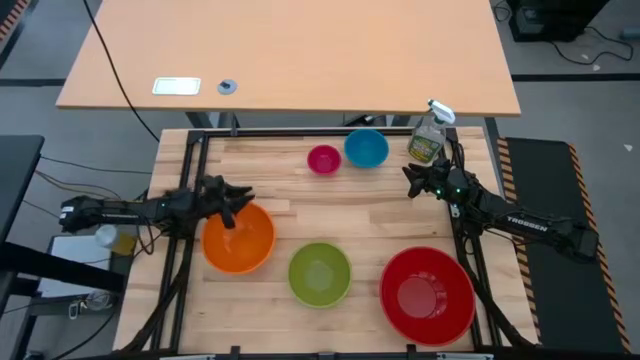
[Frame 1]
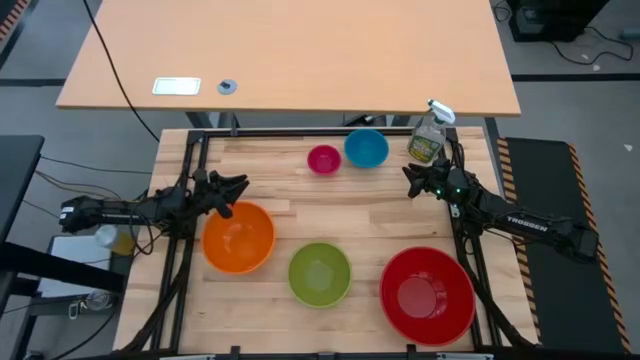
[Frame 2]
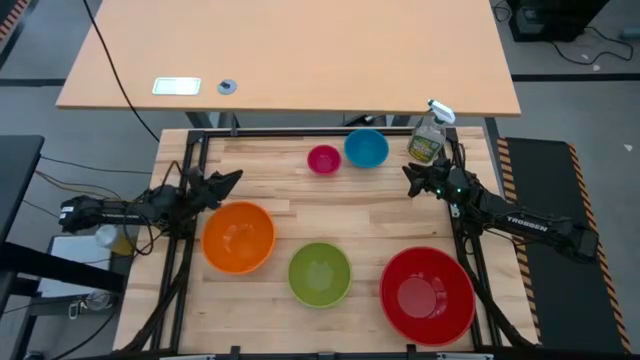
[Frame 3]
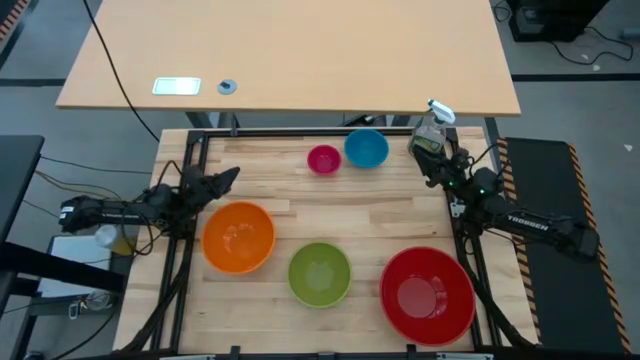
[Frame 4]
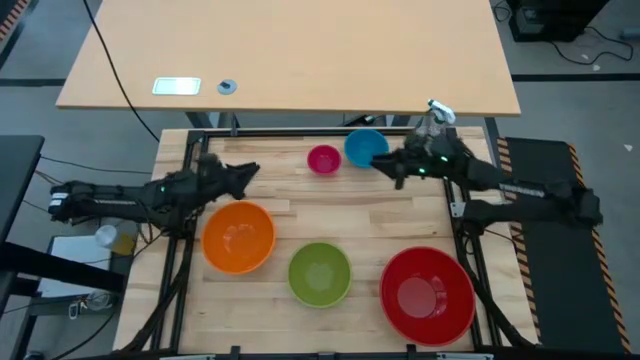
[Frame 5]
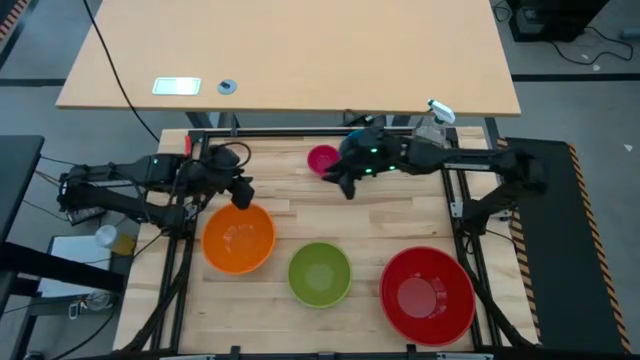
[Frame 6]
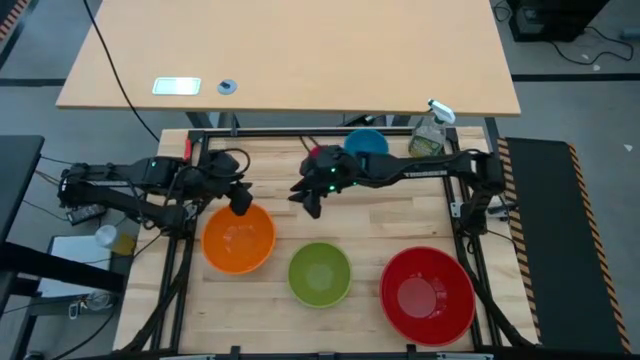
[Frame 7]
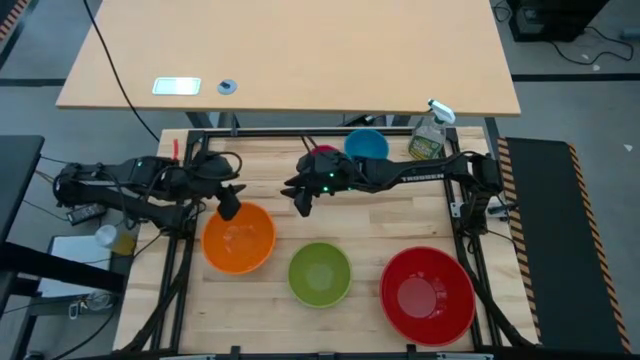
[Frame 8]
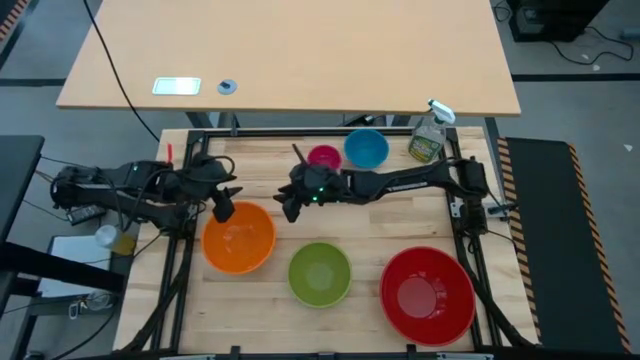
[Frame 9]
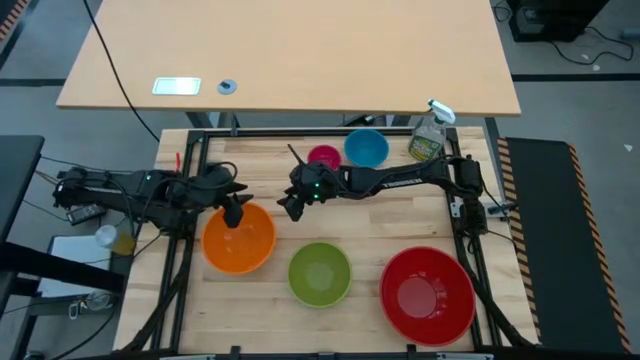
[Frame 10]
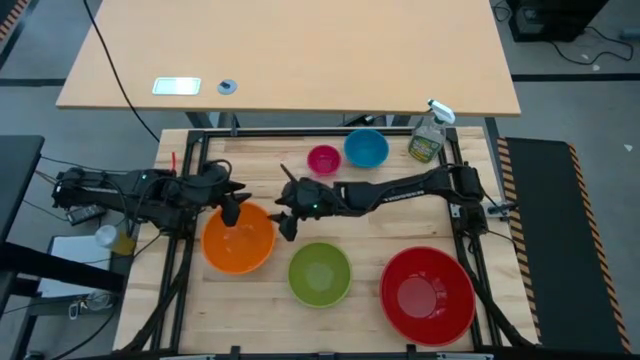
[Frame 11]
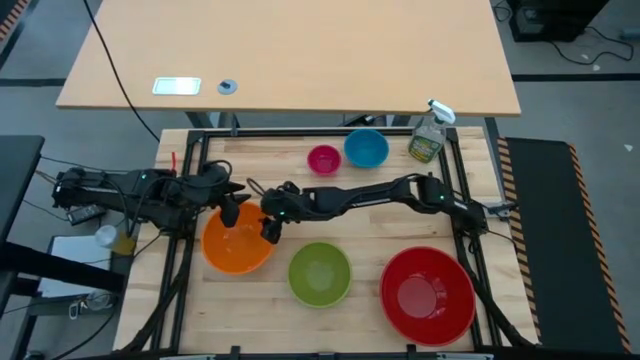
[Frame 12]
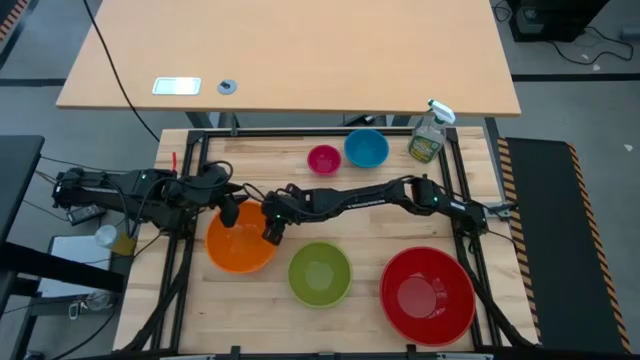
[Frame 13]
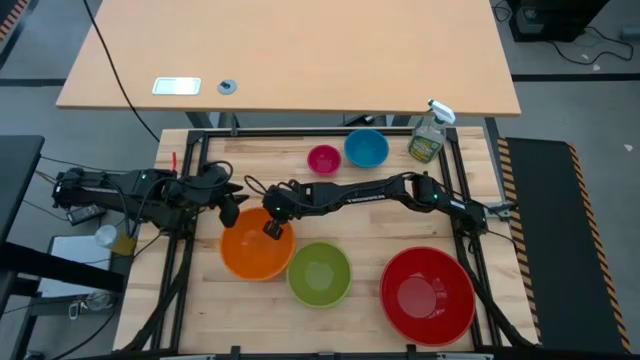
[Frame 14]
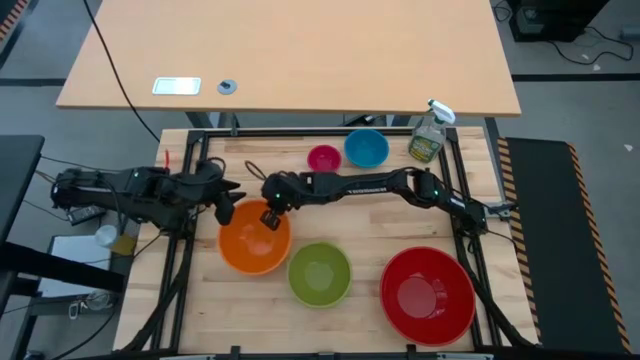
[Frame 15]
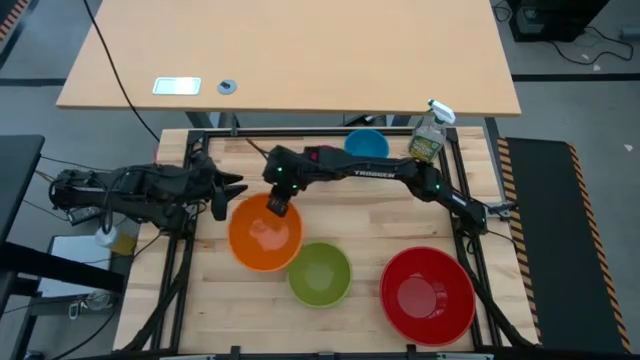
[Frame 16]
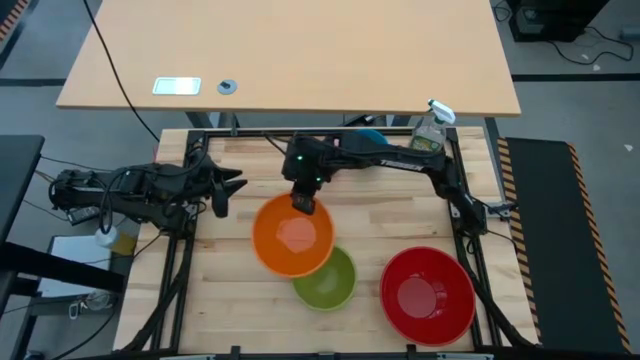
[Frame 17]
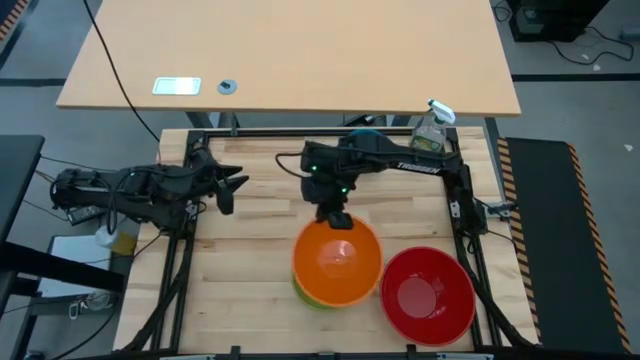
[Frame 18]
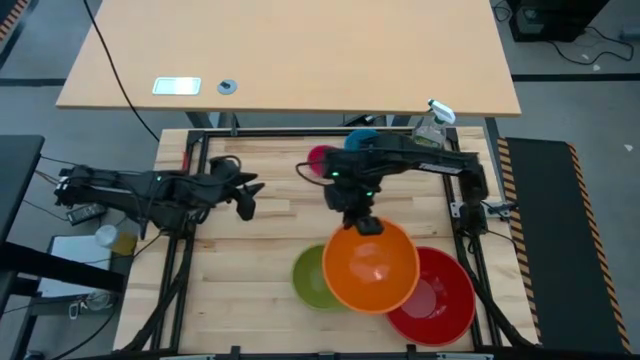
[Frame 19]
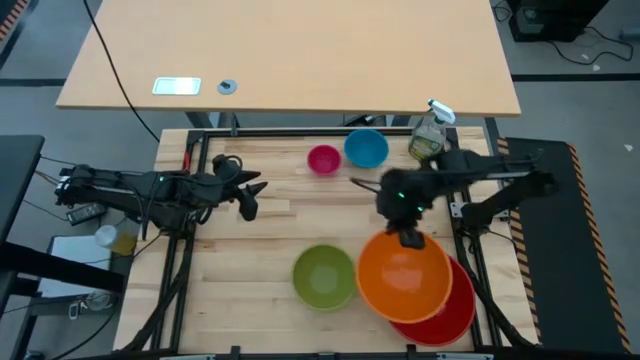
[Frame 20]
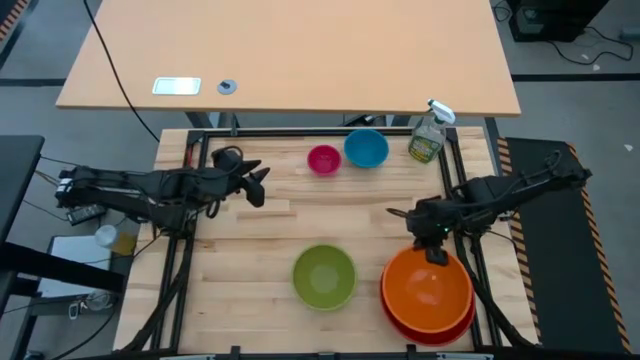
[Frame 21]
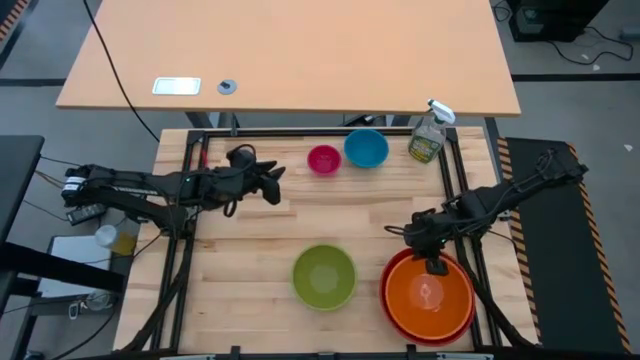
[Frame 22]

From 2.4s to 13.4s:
Stack the orange bowl into the red bowl

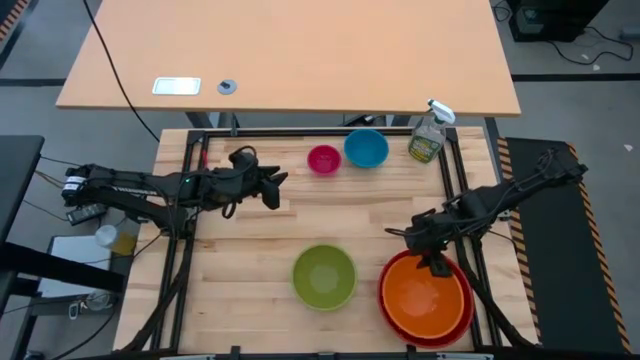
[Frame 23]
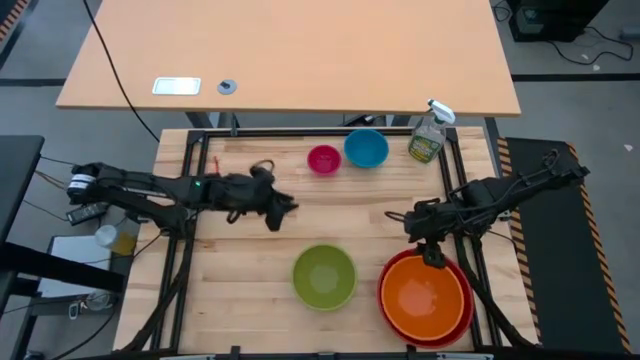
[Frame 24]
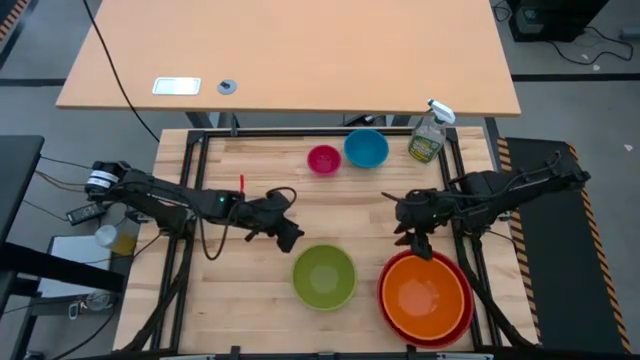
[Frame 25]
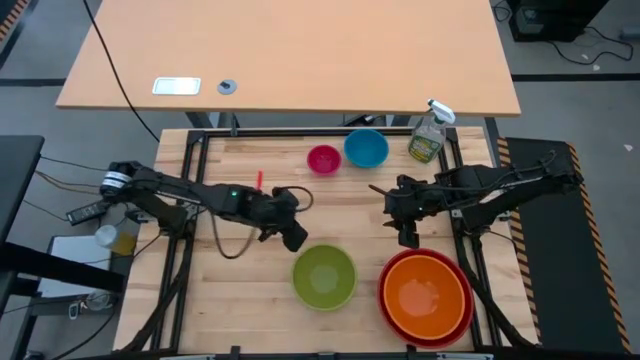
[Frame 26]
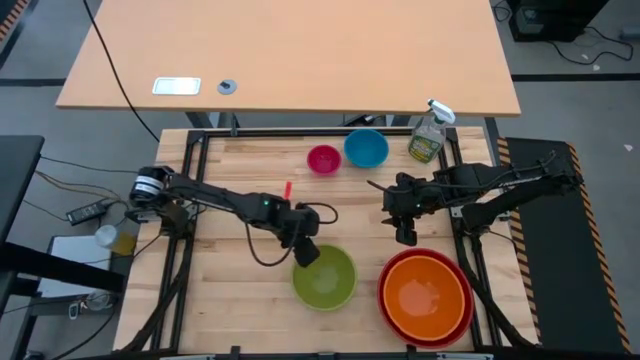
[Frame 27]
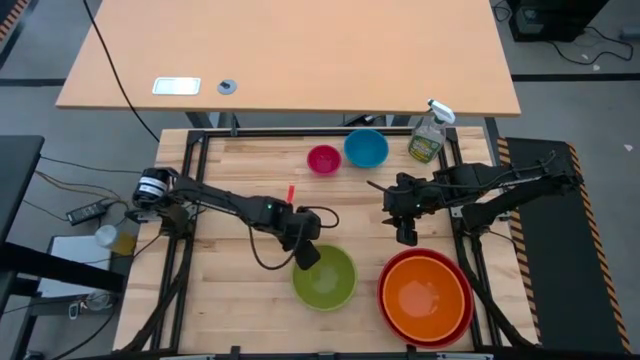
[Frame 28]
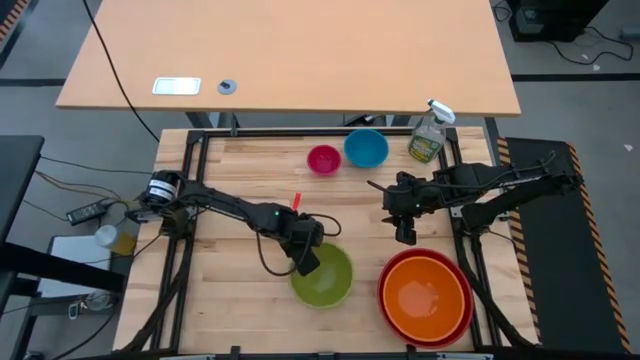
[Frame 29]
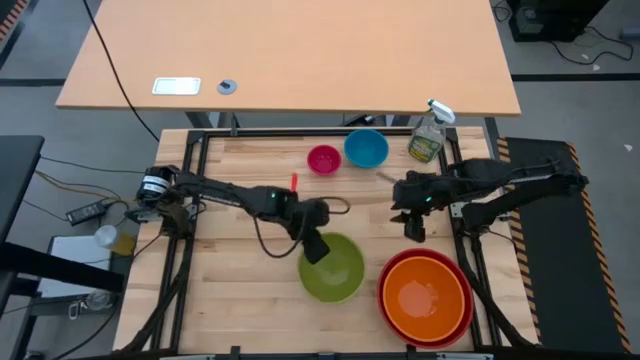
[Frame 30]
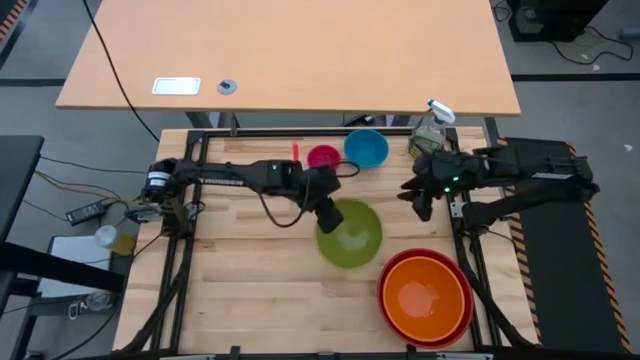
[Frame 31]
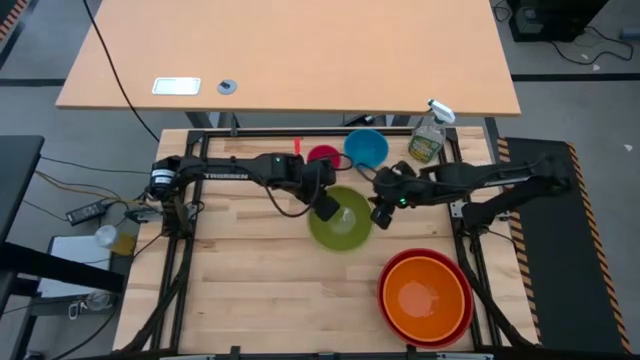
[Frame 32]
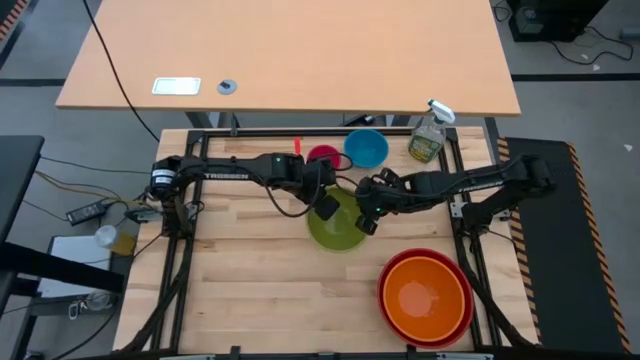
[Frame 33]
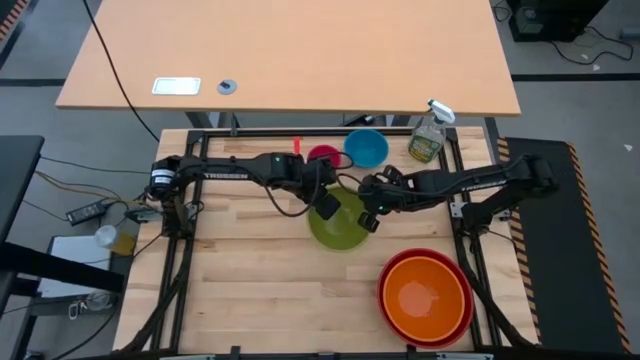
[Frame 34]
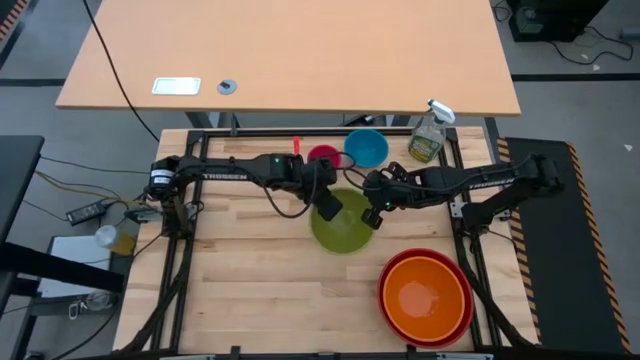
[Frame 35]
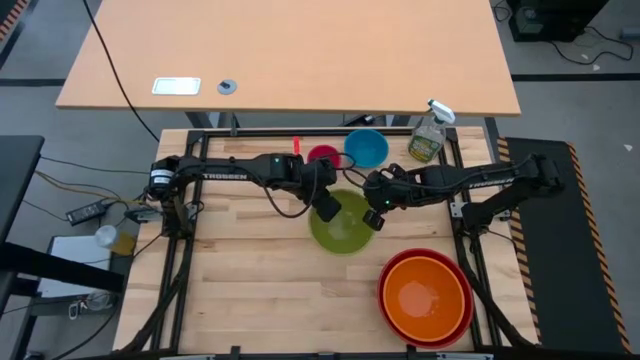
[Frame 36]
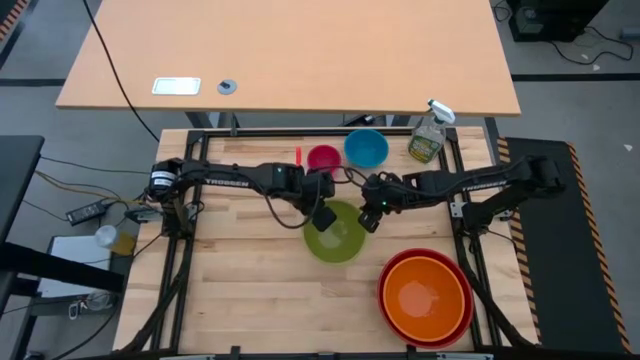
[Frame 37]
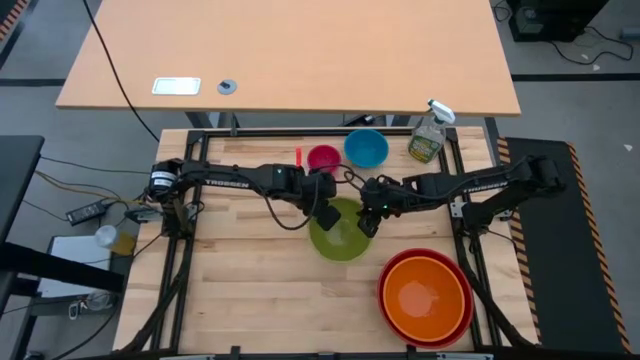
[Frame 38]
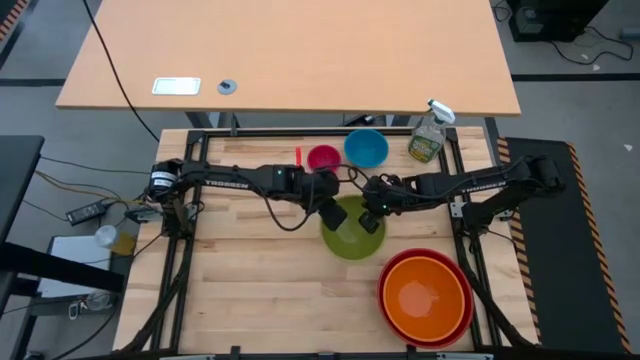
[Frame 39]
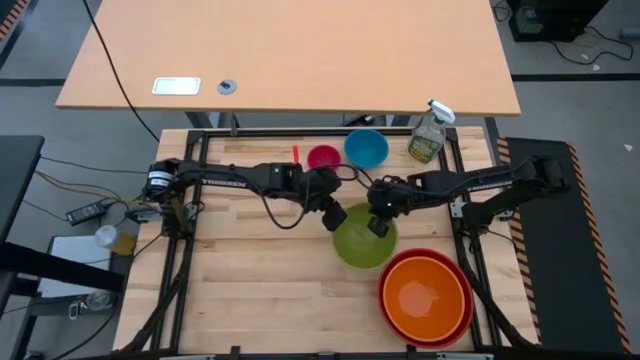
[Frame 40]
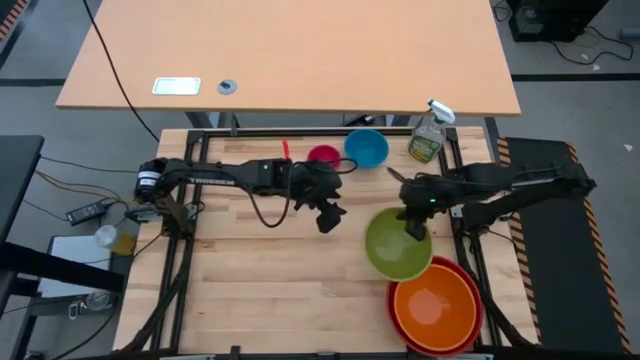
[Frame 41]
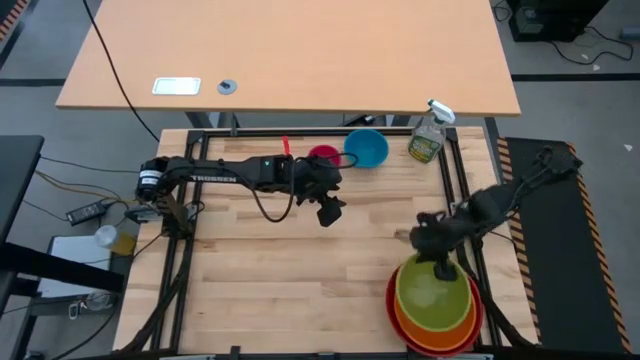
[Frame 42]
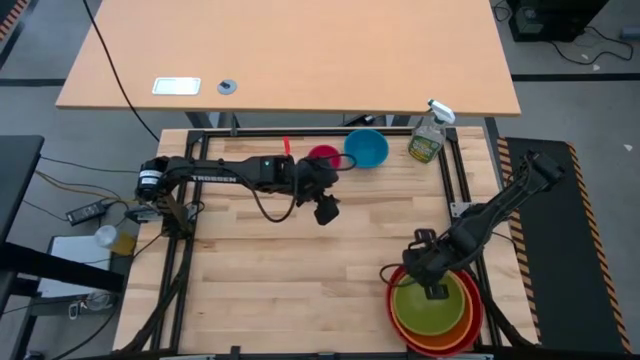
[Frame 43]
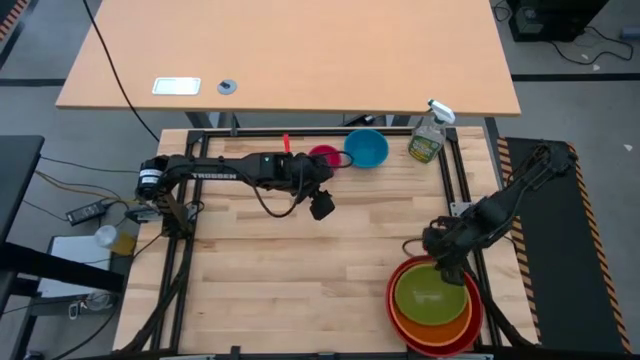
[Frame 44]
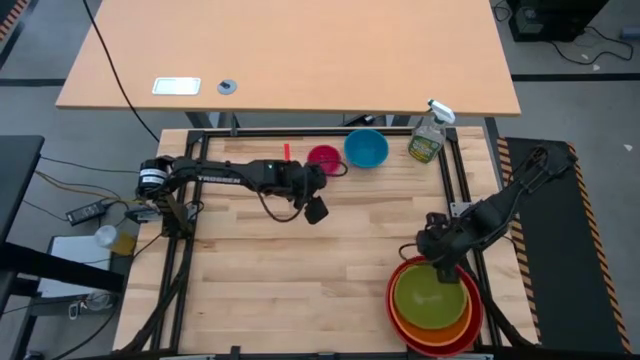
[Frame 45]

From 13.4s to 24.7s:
Stack the green bowl into the orange bowl
